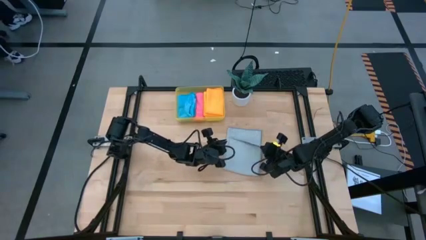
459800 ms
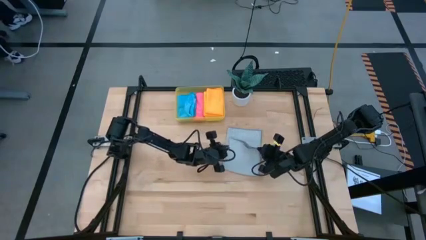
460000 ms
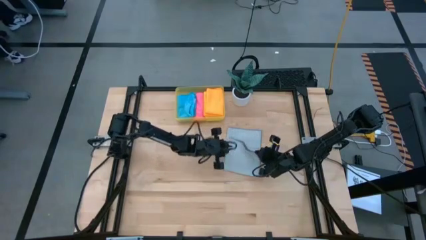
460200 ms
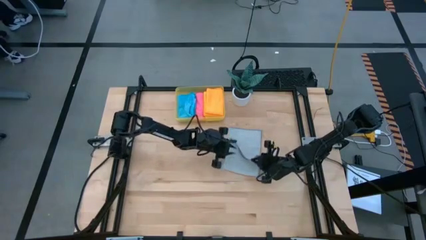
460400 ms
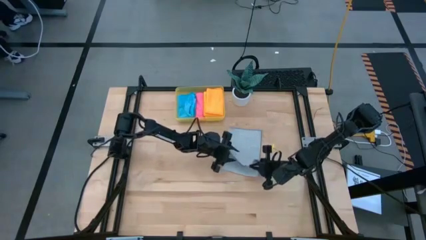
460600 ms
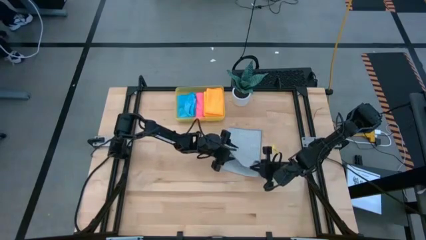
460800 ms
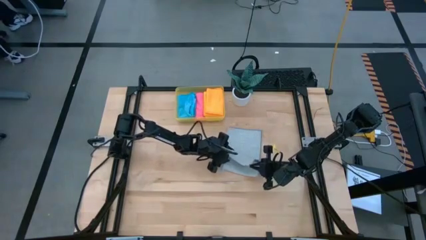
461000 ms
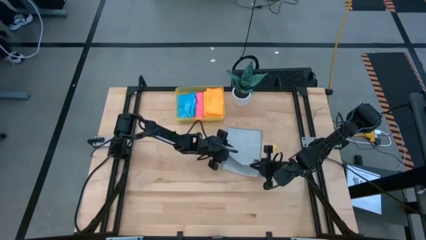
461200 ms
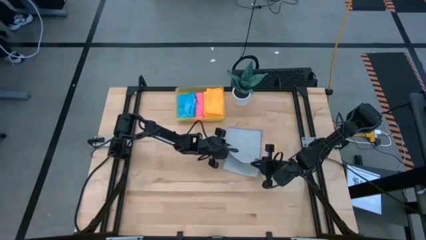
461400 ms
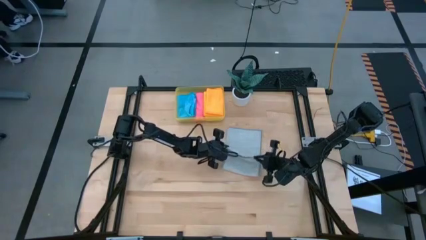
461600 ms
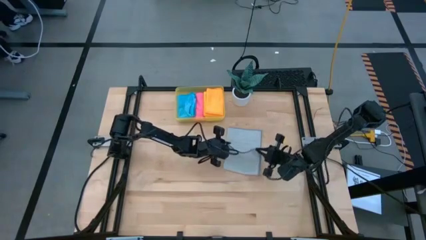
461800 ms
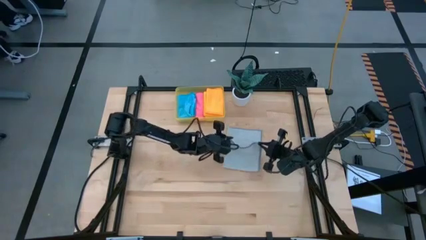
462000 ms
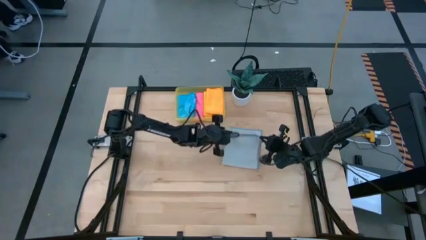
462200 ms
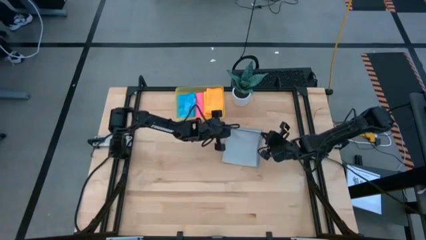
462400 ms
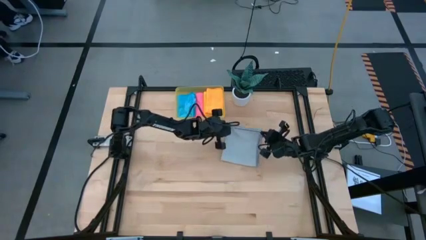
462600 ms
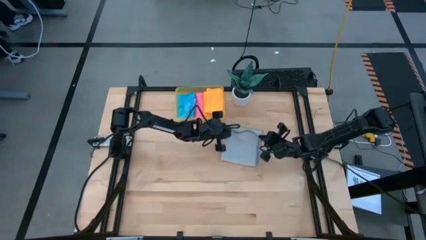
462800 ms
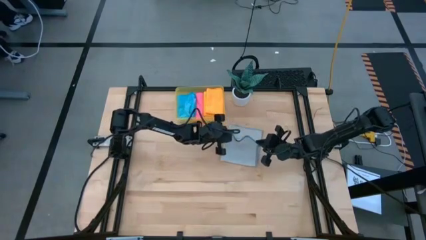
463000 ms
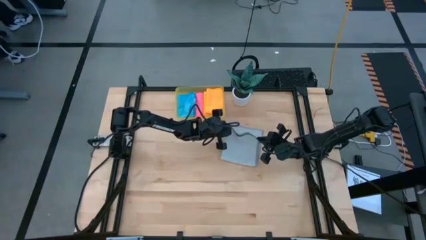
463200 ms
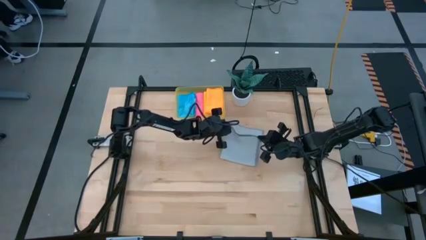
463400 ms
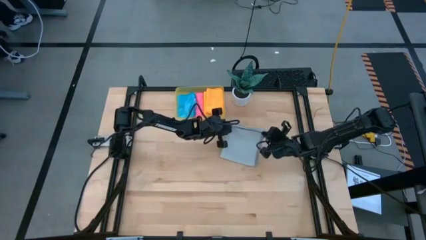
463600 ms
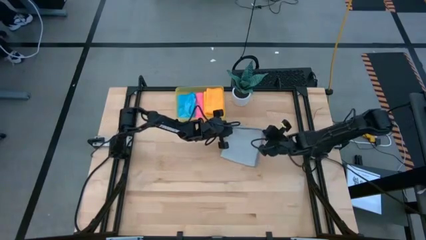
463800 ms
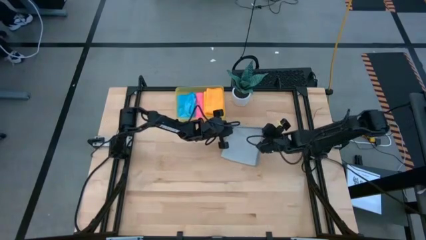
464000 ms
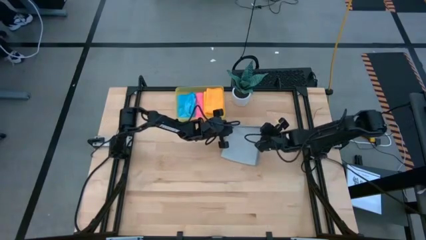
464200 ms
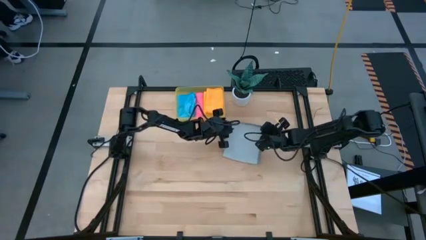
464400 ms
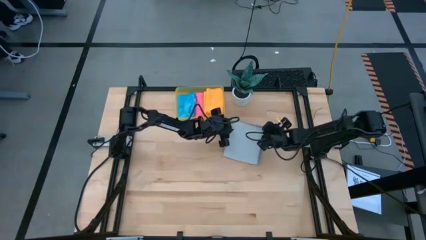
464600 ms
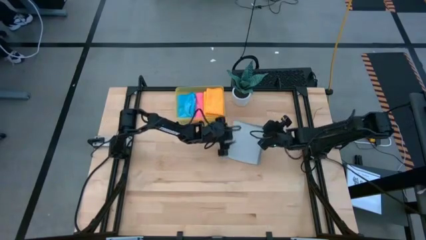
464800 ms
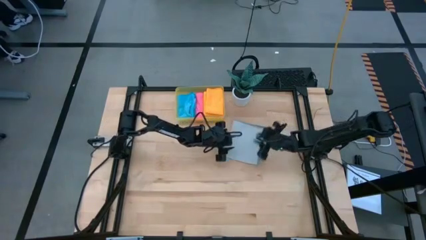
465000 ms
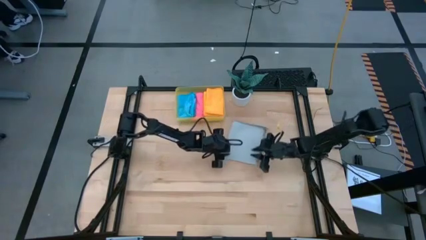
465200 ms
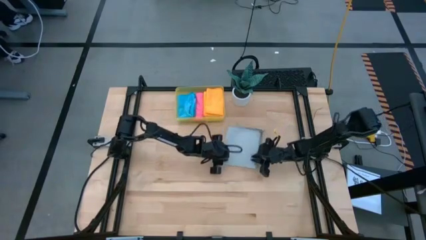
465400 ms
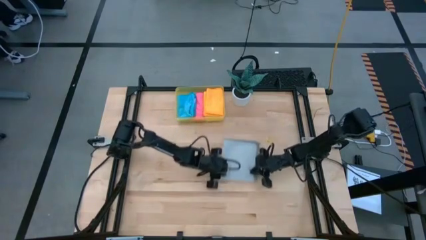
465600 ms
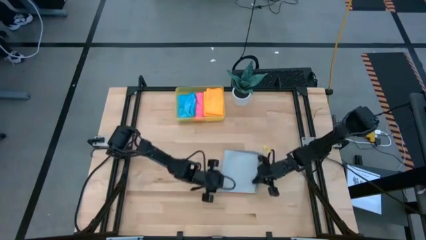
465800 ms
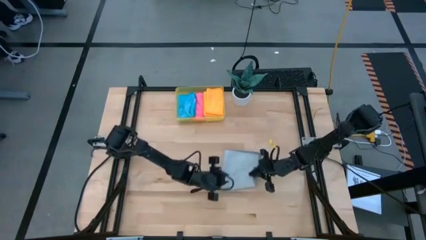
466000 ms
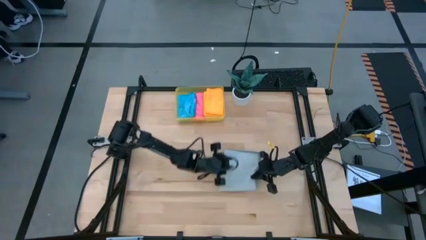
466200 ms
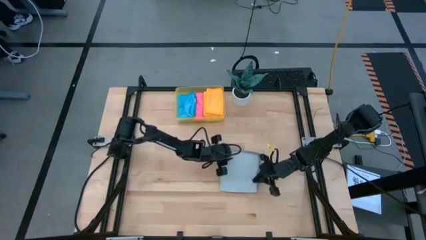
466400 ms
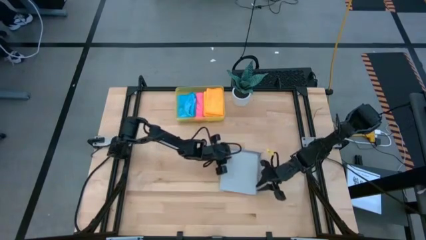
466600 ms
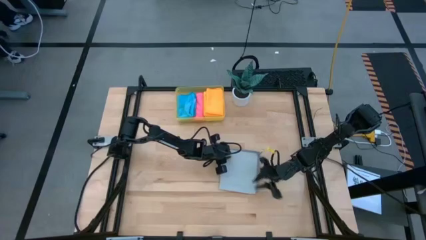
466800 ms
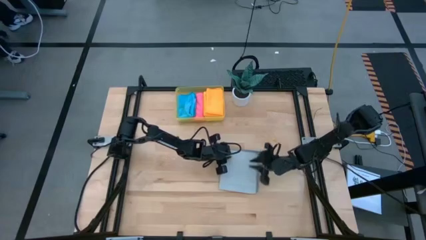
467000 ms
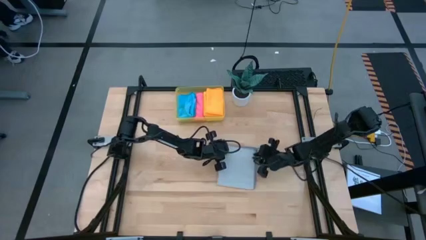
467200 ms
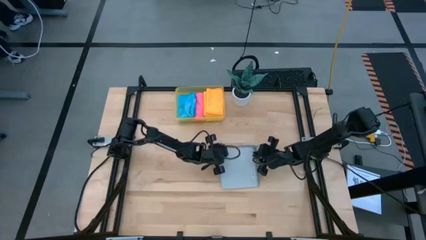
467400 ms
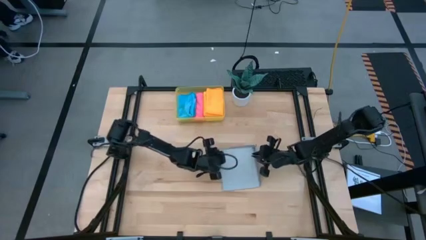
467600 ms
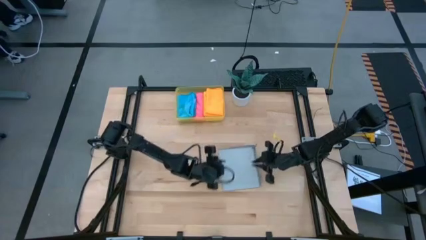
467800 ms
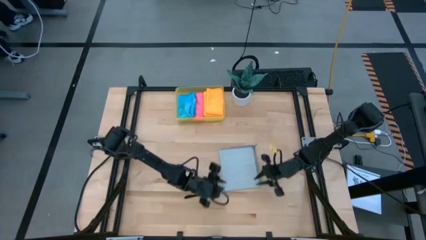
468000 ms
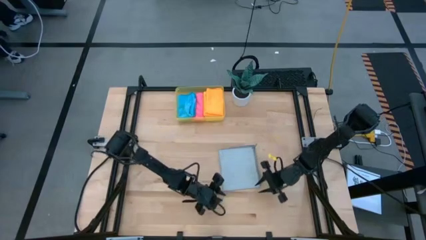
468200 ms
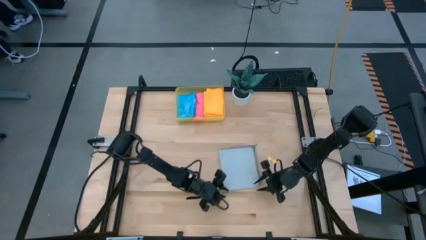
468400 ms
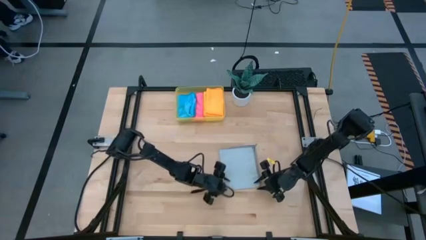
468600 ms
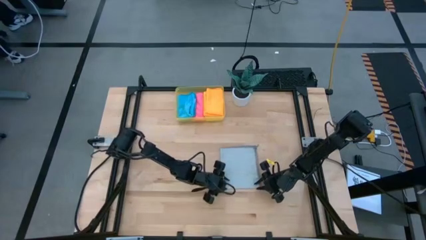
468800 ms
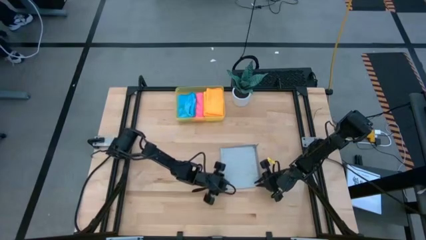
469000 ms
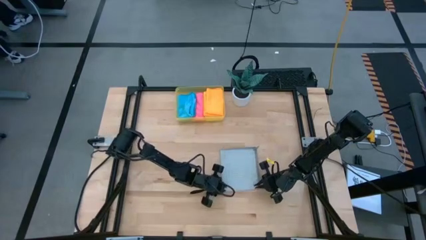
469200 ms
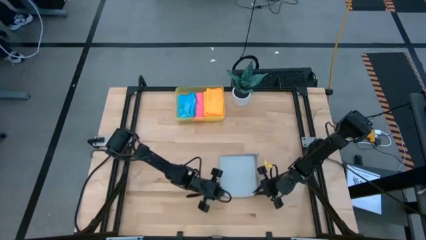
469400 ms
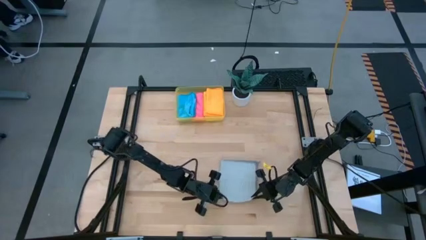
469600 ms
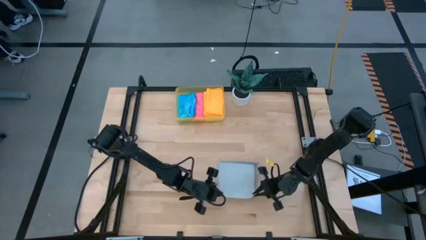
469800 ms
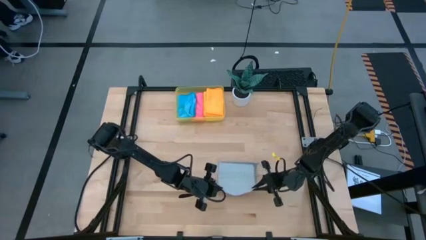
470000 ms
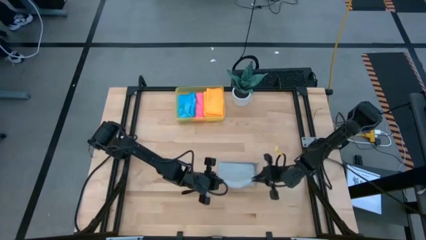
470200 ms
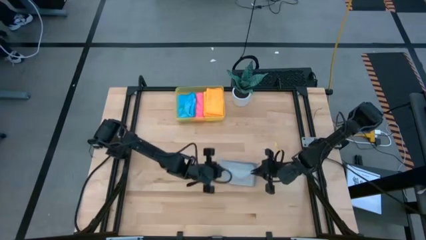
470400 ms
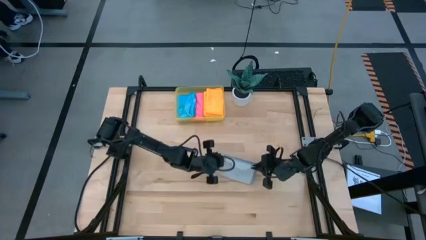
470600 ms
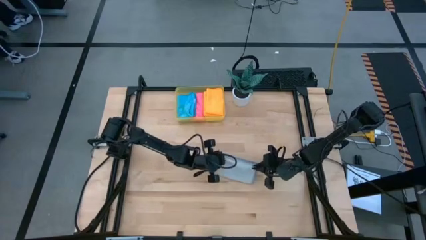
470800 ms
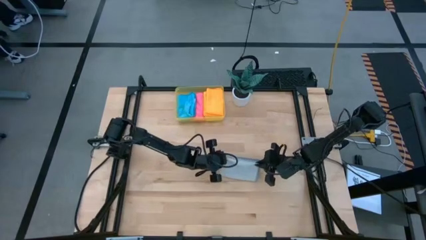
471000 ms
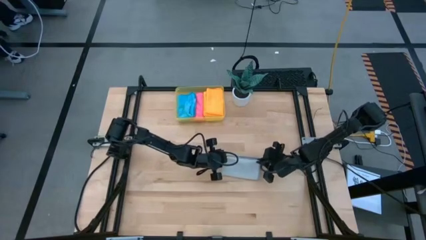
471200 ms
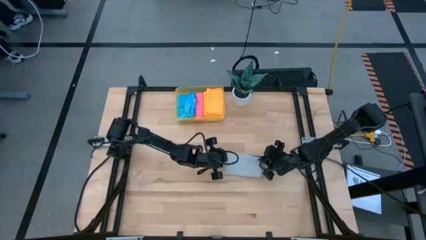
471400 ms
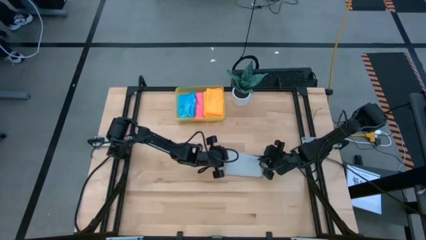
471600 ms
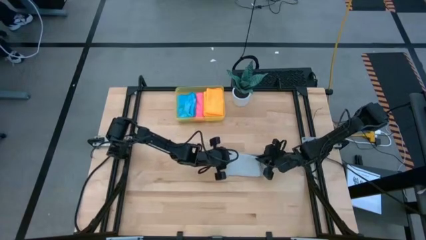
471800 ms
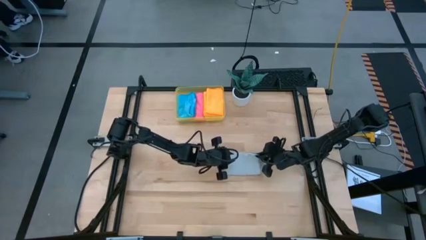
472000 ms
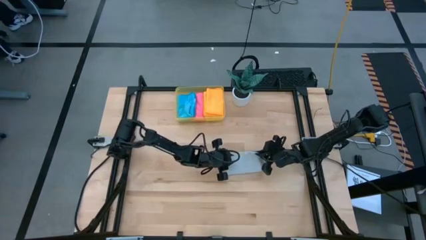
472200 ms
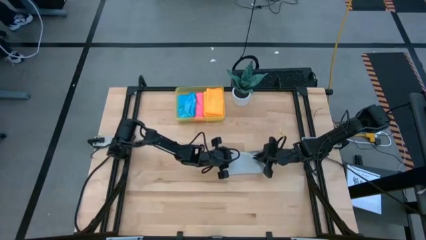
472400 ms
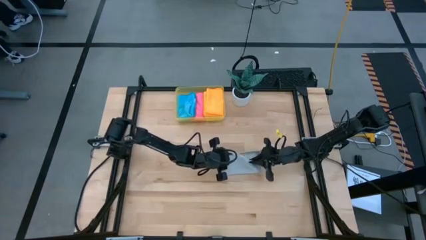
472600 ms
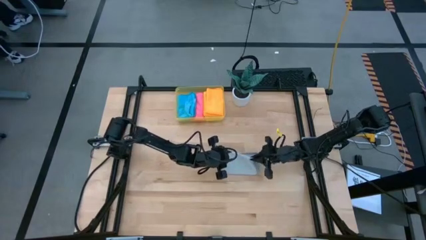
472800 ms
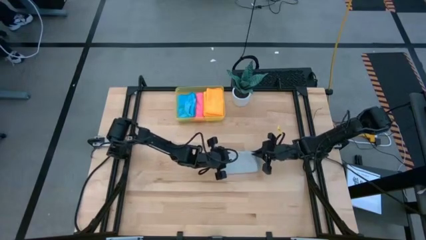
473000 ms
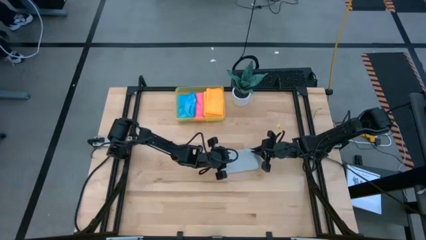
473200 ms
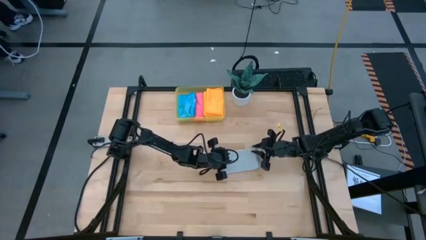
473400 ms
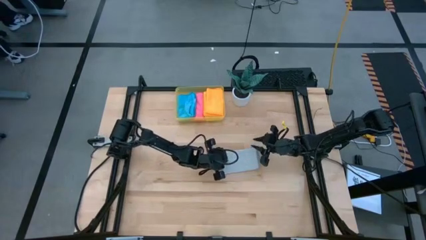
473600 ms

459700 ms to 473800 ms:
Task: Fold microfiber towels
Fold the gray microfiber cloth

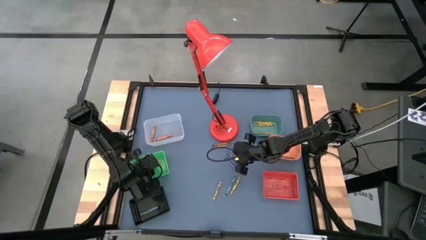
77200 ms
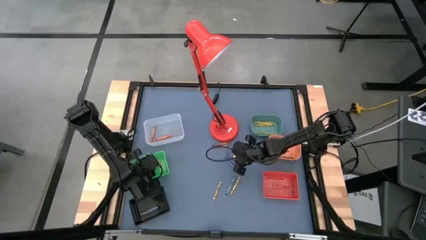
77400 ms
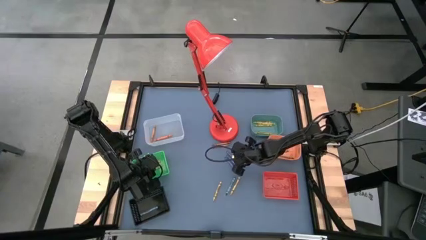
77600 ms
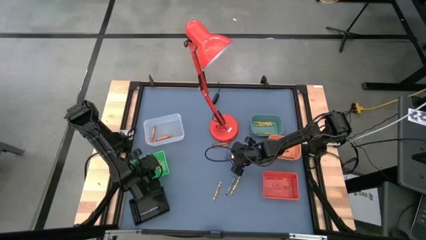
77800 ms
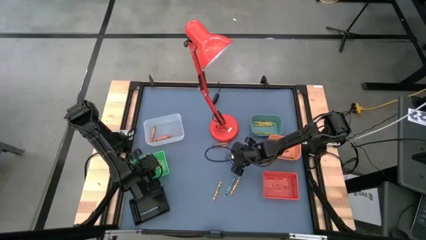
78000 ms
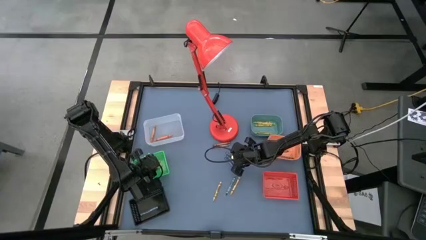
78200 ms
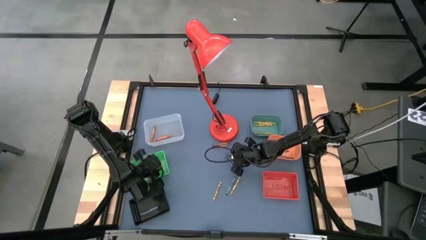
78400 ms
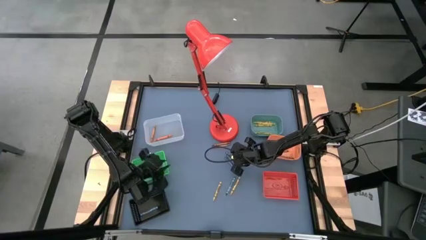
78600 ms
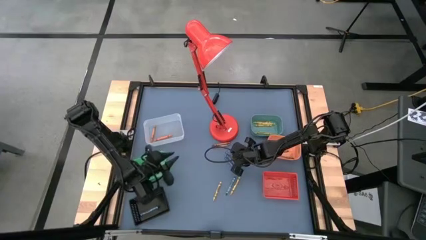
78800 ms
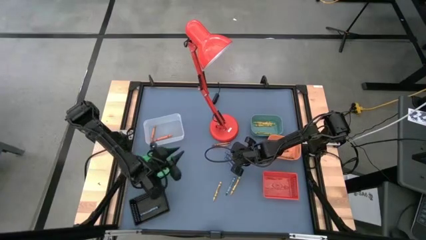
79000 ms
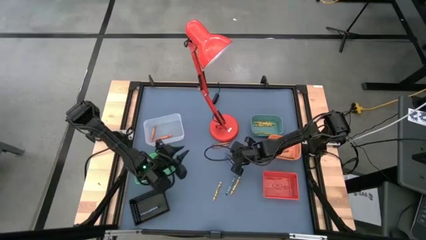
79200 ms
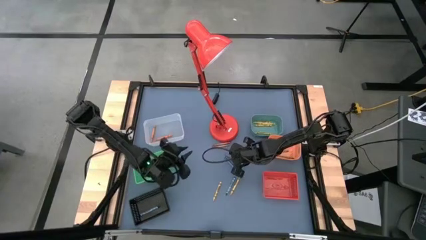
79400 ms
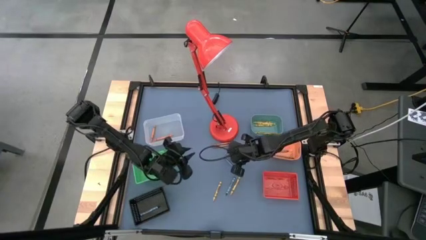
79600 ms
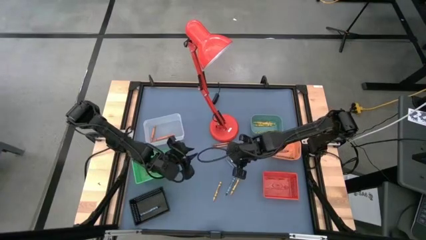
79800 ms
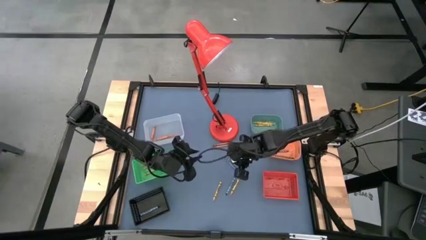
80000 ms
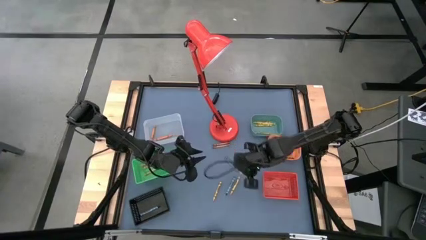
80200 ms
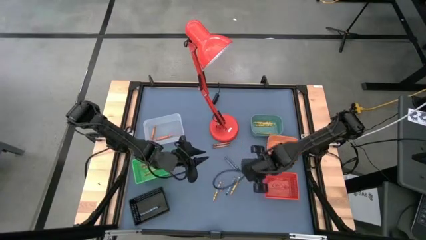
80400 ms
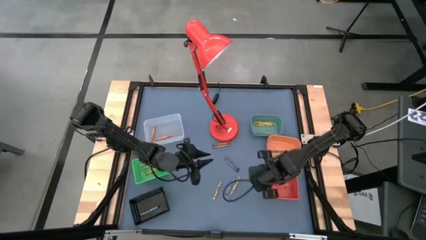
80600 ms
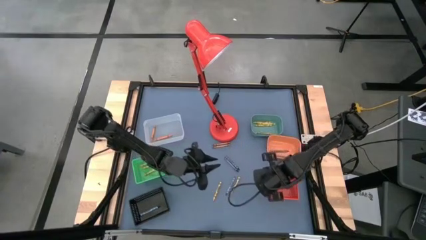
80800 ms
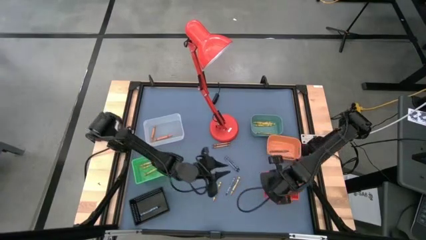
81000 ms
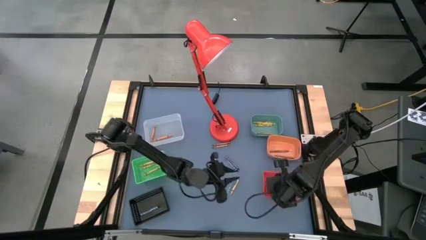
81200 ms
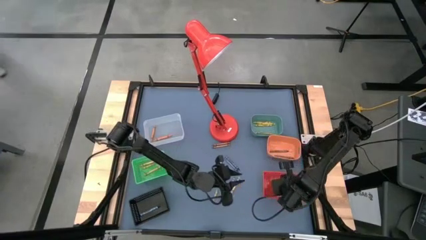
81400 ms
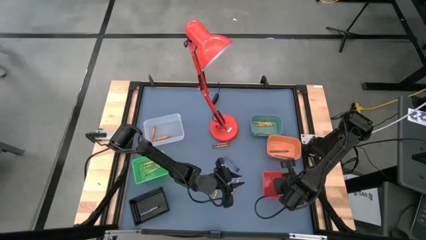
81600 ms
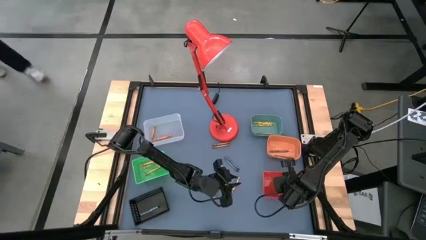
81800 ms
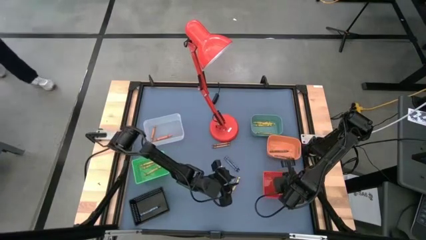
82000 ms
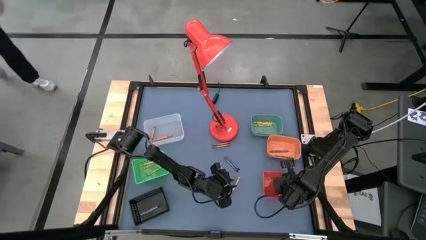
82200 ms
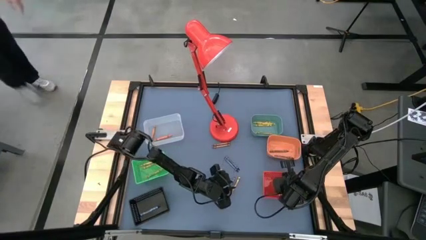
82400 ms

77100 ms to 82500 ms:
Task: Sort crayons
Put the dark blue crayon into the red bin
